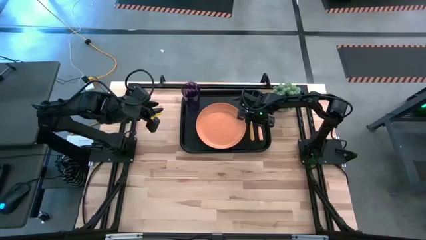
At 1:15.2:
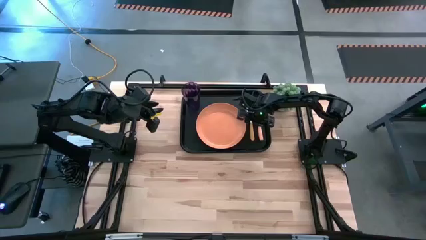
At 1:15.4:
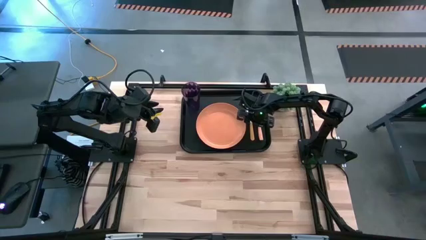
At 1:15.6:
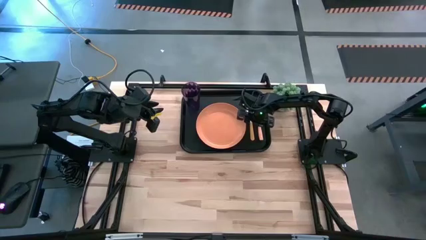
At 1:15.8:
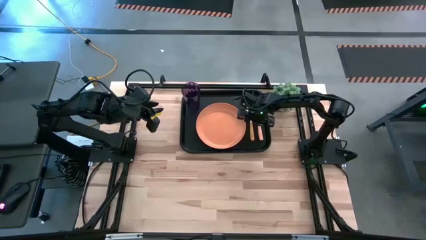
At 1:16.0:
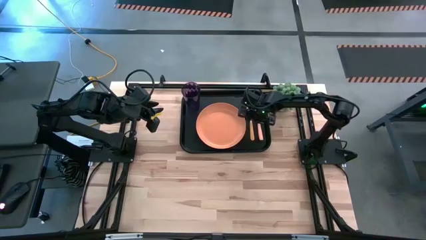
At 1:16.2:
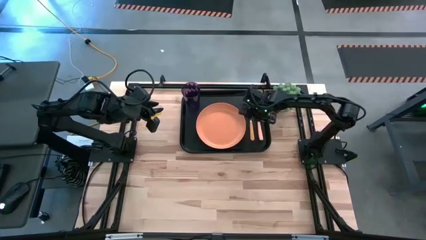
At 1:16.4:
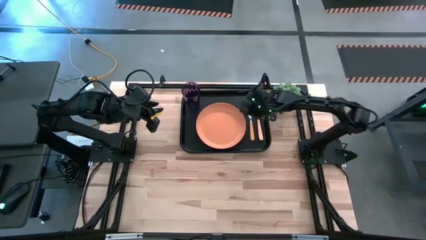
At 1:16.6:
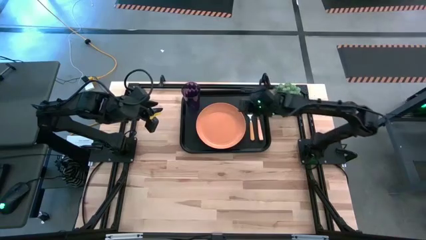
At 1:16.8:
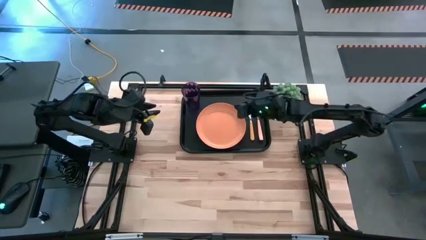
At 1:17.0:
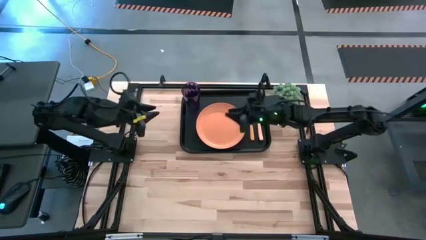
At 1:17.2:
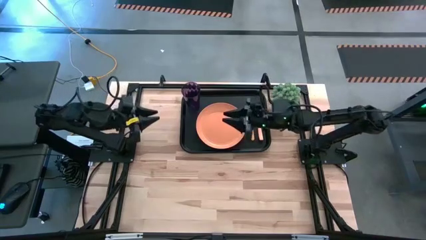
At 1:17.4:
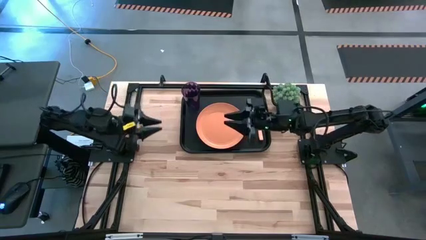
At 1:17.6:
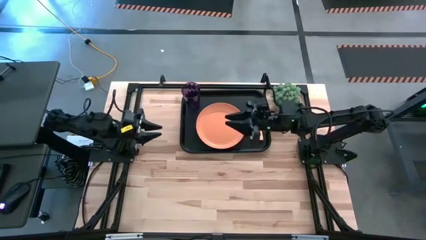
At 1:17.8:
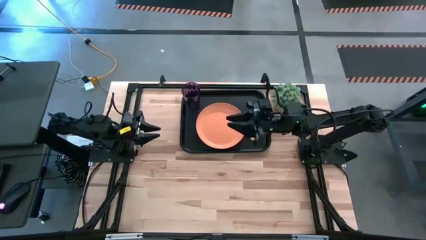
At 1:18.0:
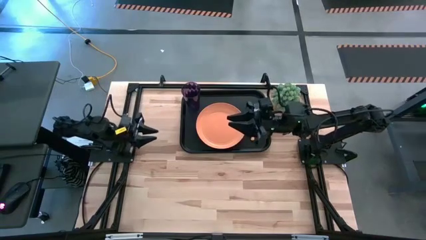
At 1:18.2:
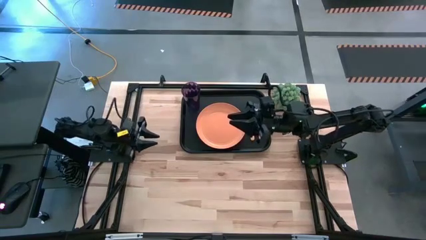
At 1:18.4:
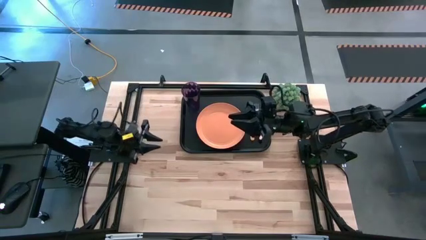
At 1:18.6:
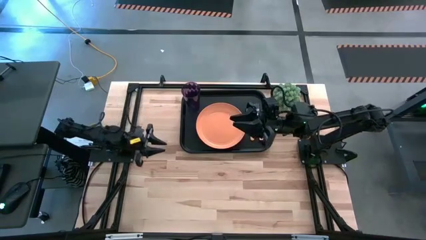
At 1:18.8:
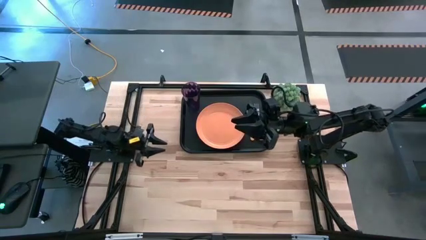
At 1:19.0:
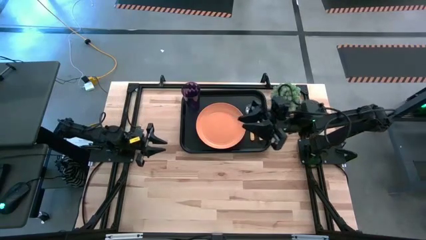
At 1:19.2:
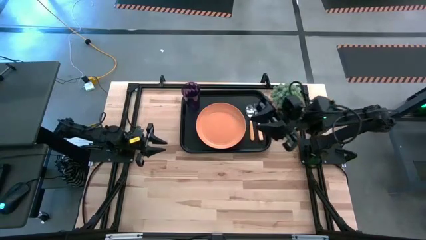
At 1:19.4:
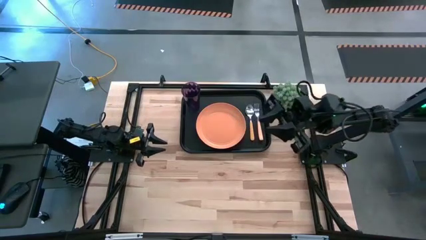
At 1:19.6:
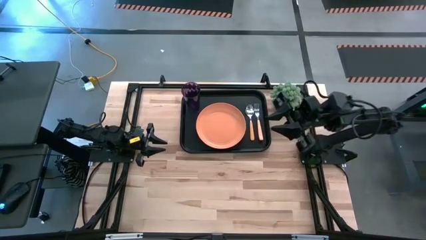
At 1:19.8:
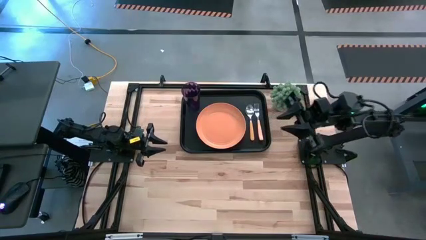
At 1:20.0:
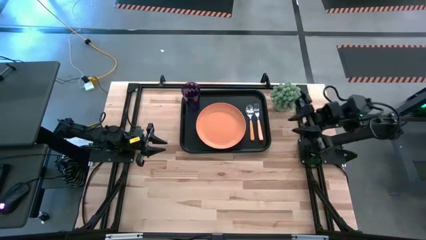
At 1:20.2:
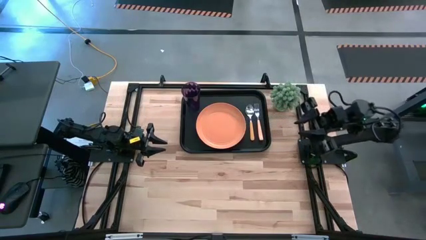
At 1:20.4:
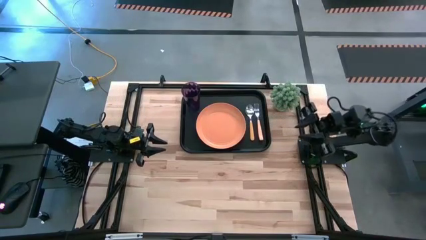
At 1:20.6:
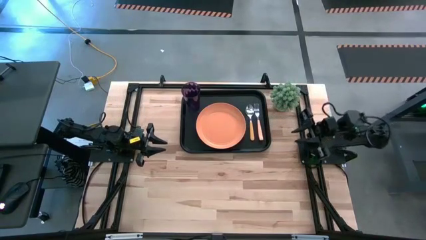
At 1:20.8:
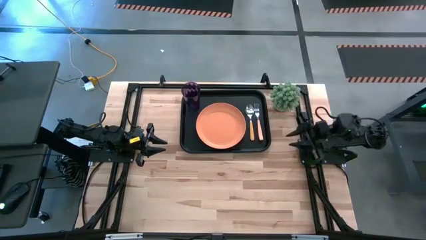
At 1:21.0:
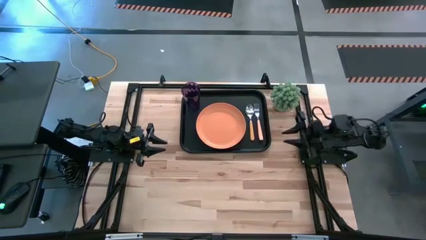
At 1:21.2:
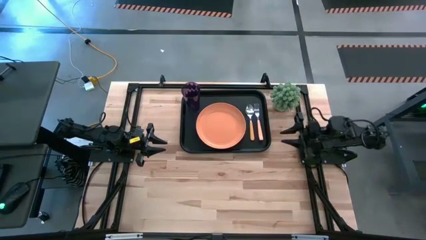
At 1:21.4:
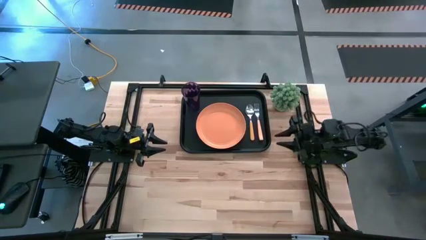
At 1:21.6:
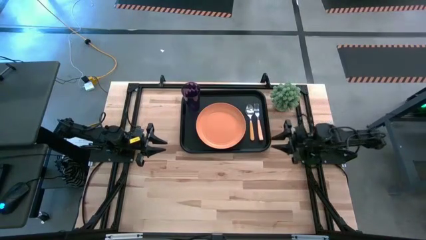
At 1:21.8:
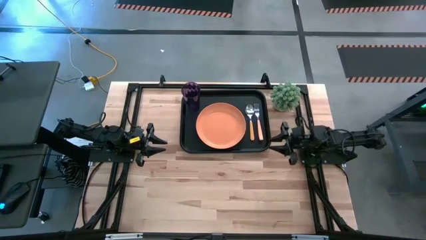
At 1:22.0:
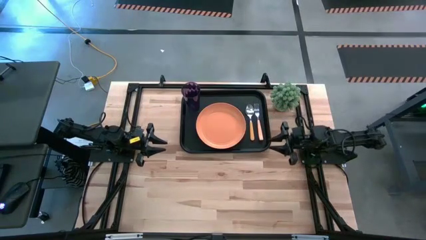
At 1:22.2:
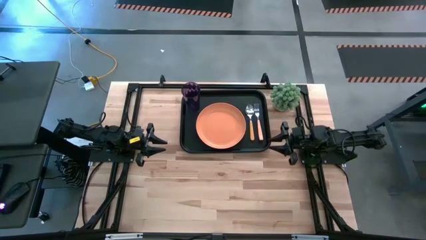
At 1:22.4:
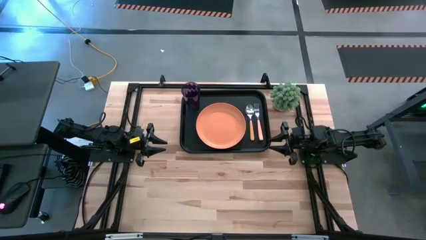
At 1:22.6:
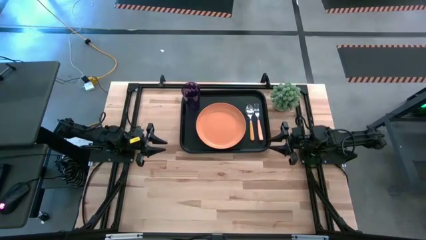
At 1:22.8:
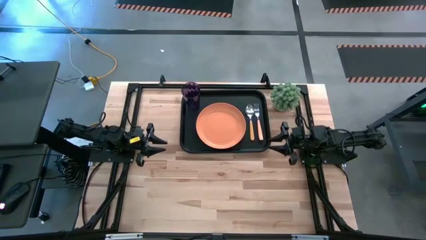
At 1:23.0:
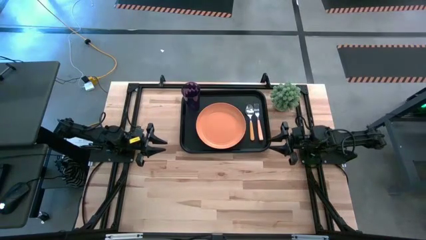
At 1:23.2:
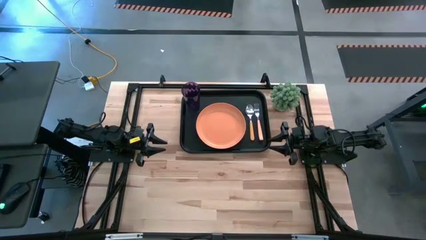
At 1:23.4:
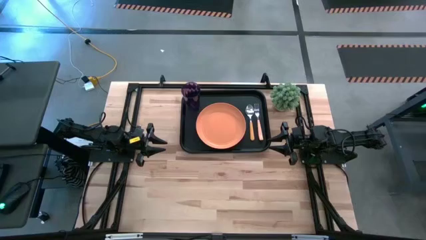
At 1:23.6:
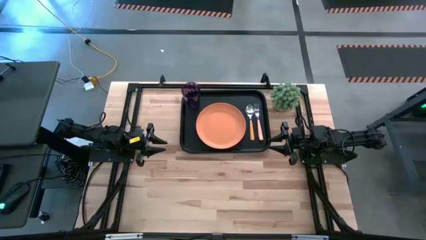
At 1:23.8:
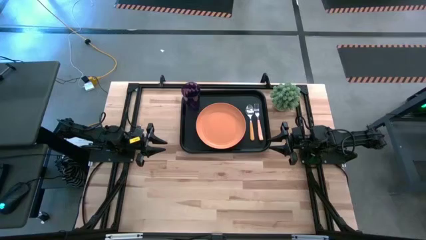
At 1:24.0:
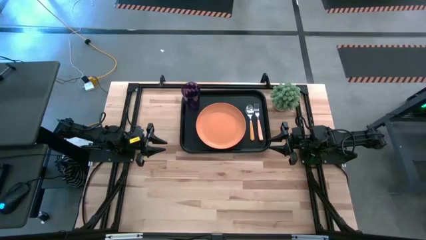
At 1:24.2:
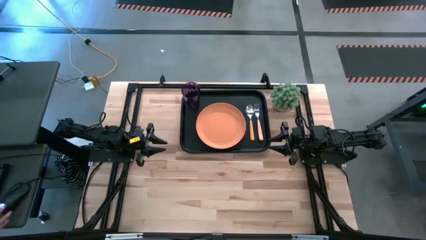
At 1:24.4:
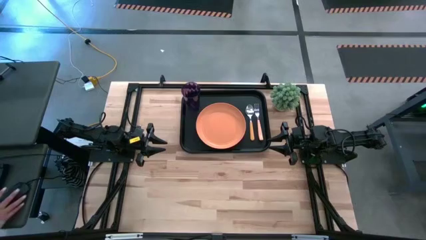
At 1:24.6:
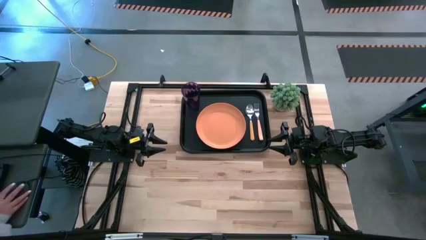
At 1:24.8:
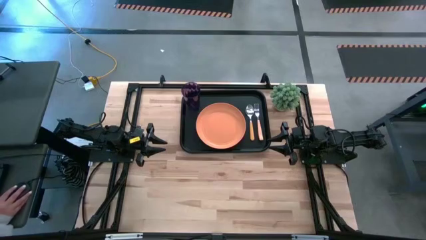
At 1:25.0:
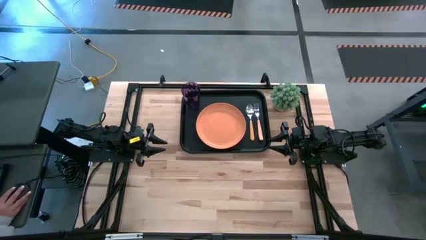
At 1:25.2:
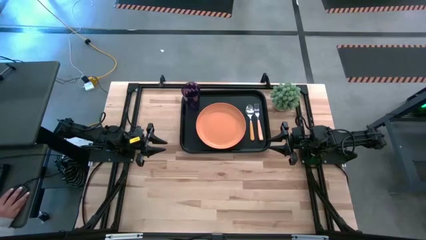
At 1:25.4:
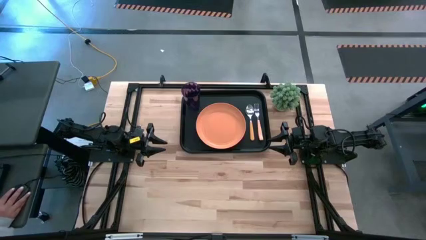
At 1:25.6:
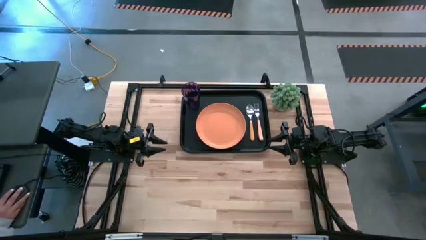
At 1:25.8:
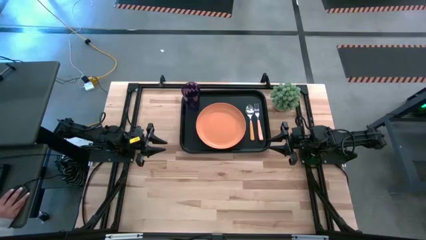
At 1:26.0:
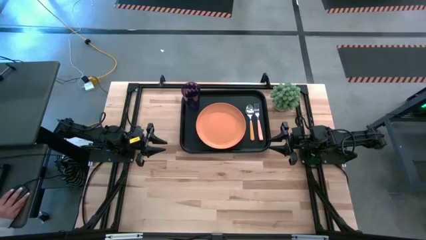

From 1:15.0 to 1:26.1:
Task: Pick and place plate/cup/fork/spoon on tray
Return to Home Position

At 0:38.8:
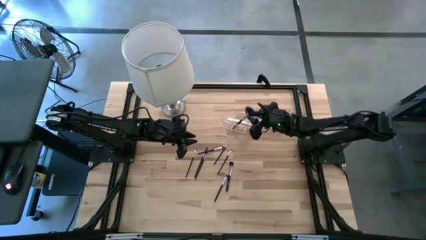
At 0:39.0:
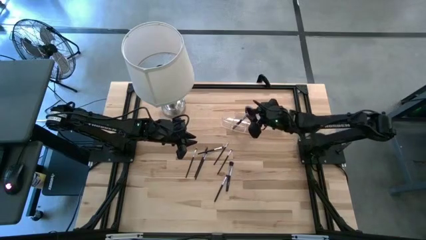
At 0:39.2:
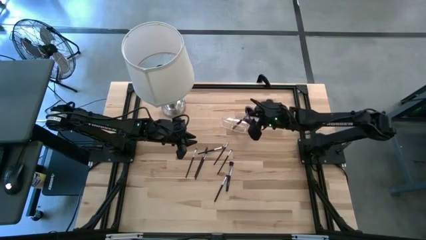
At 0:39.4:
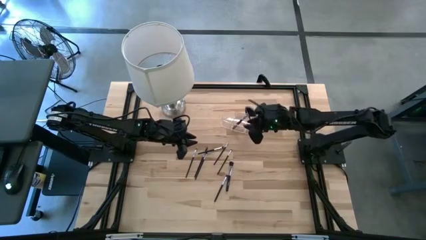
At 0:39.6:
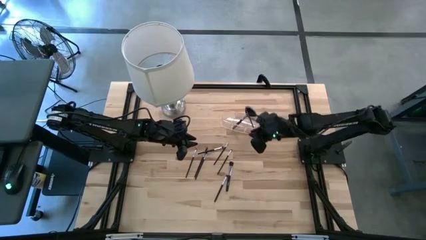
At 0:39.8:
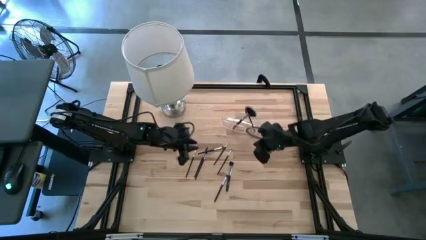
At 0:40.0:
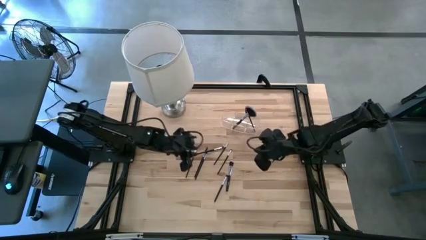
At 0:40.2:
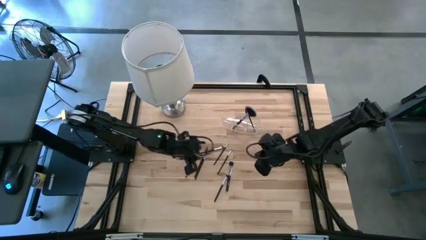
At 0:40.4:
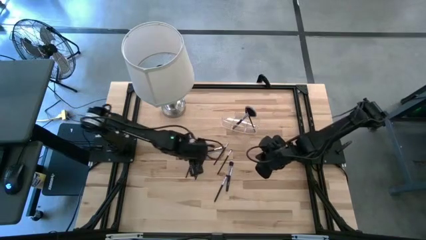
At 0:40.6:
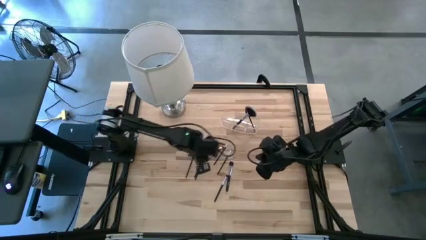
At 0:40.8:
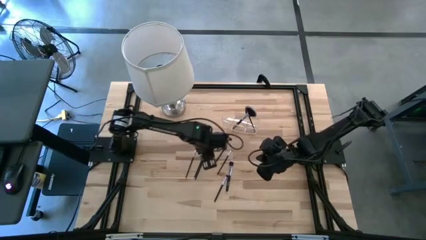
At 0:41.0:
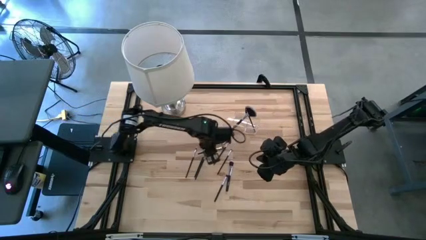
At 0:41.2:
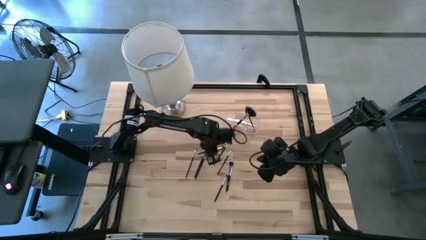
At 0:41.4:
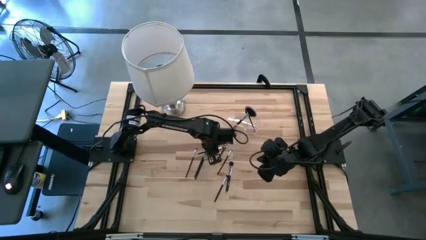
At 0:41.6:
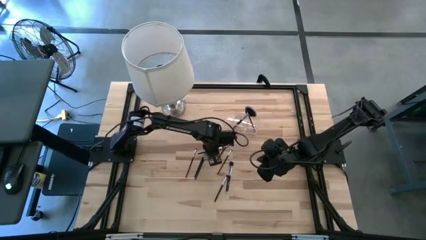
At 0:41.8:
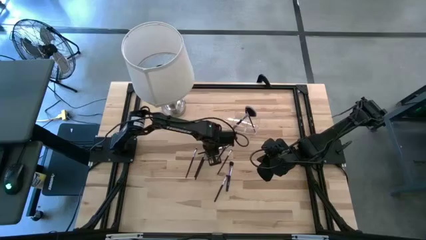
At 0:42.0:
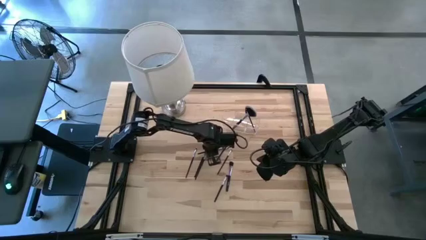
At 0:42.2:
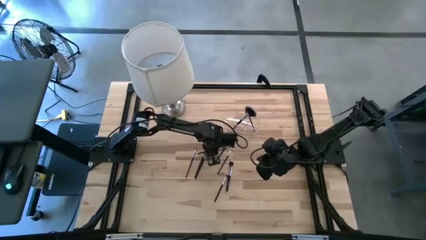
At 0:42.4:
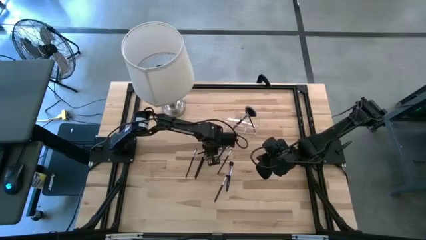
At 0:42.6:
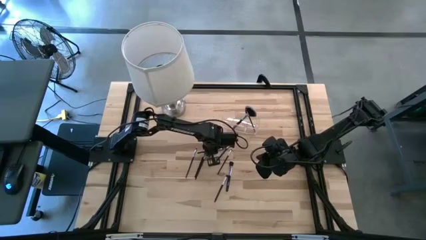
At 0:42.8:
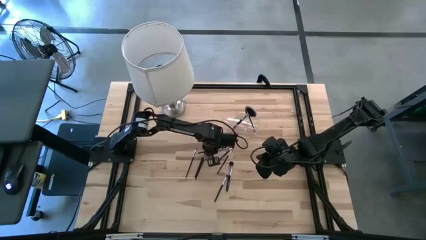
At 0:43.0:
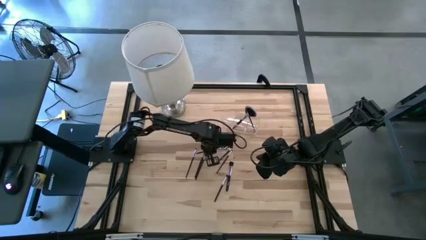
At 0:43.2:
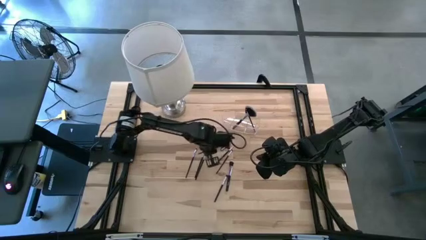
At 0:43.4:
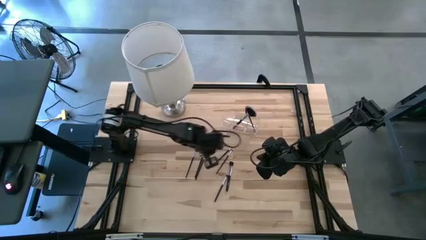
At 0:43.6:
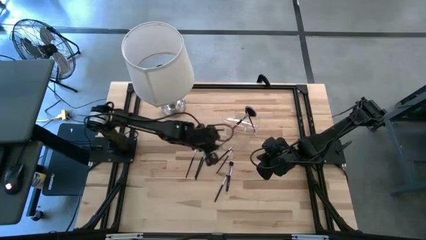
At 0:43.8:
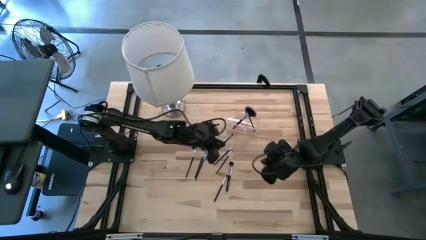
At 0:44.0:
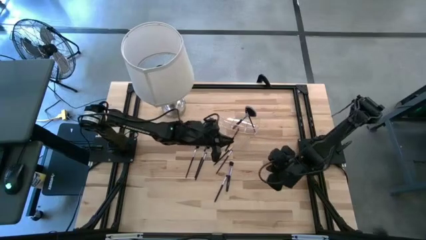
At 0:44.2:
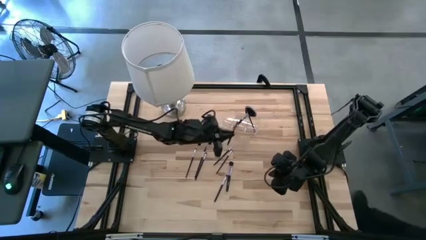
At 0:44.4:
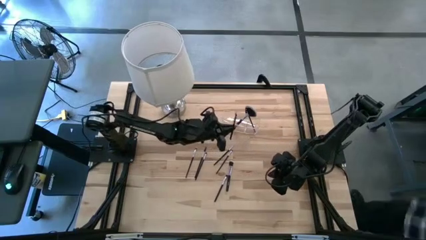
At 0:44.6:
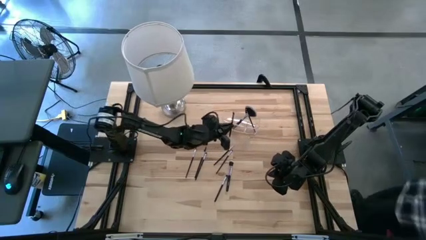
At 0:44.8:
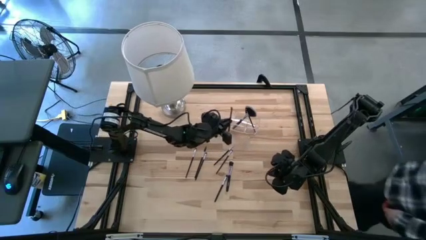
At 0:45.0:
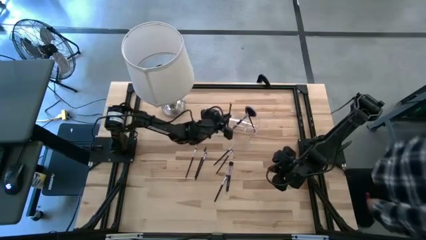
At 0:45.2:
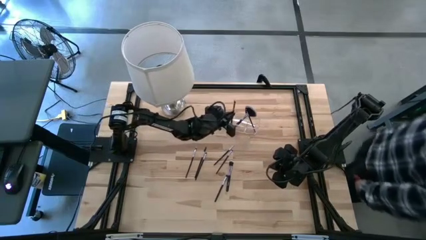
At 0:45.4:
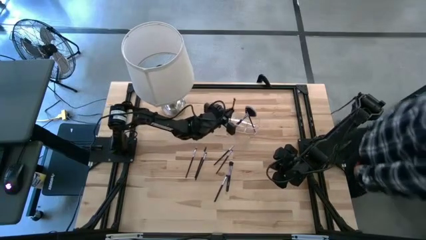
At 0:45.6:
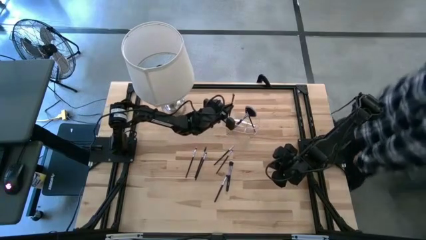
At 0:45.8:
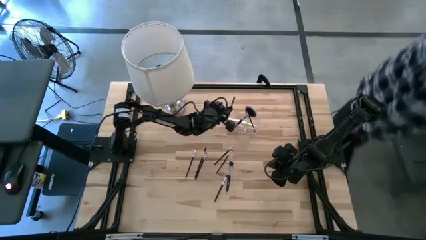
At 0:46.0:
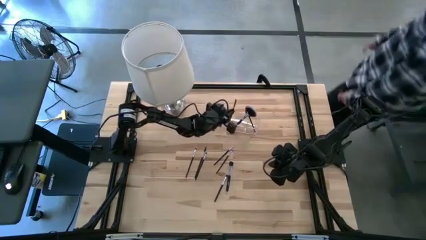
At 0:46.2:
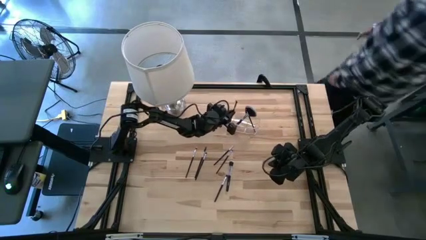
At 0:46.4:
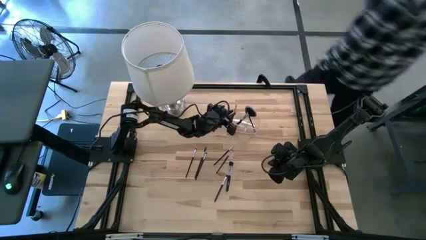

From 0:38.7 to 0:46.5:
Task: Pick & Place Makeup Supplies
Put the makeup brush into the transparent organizer
